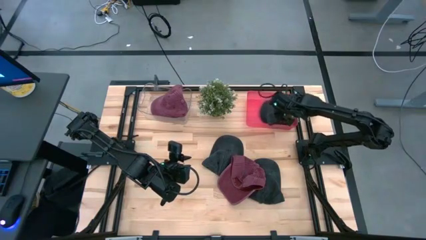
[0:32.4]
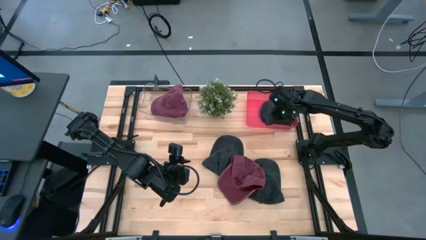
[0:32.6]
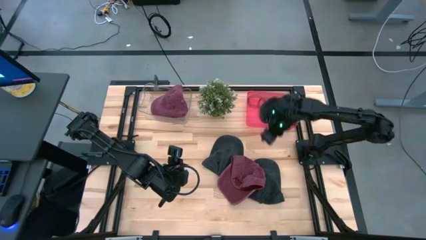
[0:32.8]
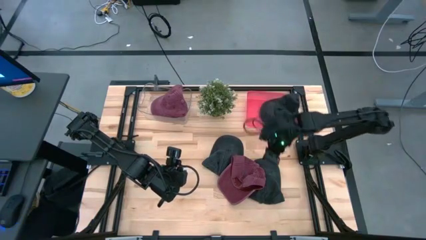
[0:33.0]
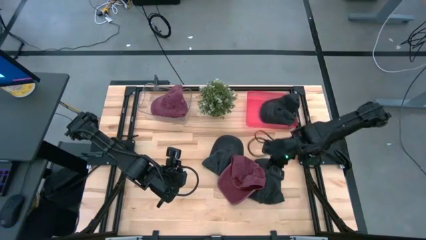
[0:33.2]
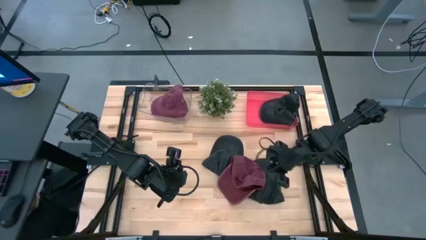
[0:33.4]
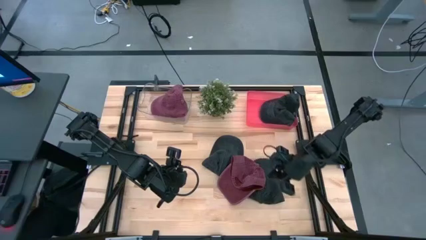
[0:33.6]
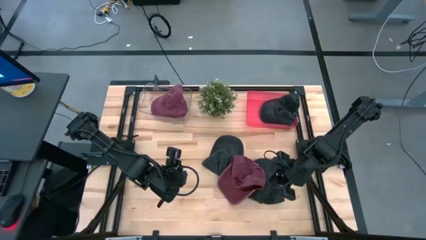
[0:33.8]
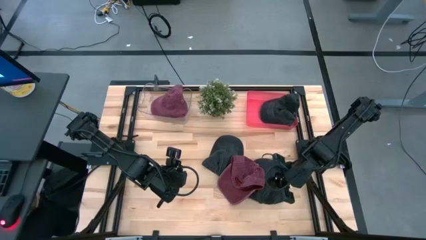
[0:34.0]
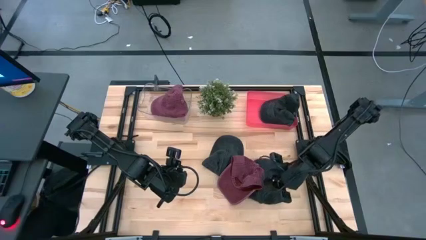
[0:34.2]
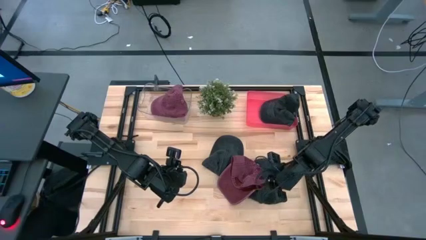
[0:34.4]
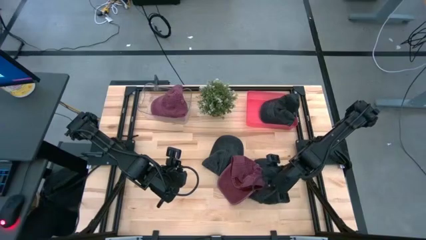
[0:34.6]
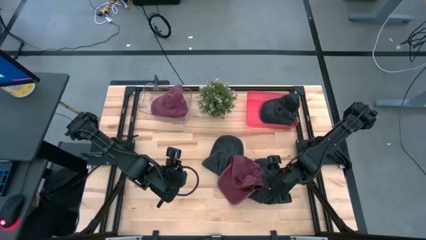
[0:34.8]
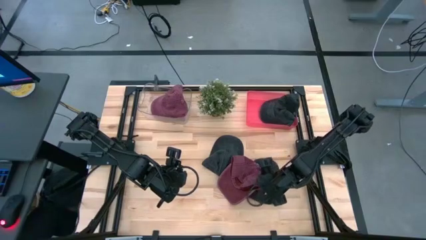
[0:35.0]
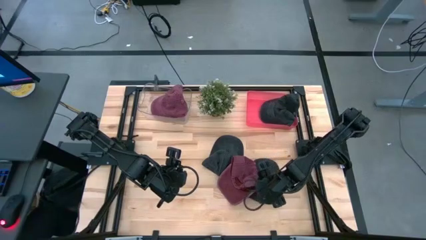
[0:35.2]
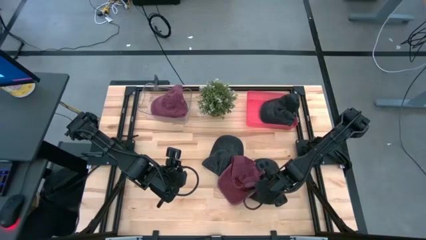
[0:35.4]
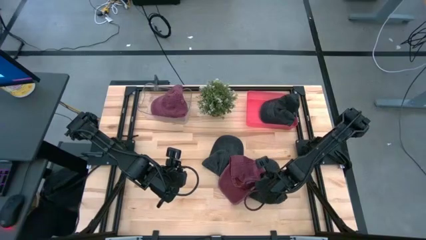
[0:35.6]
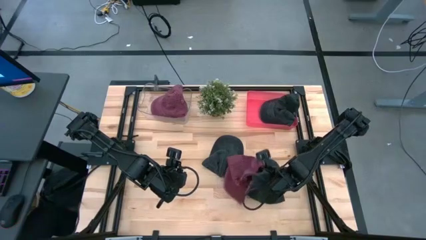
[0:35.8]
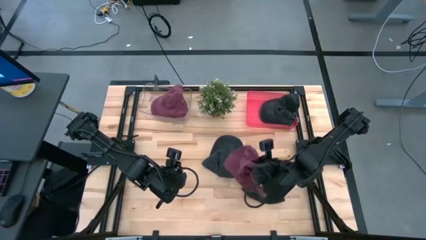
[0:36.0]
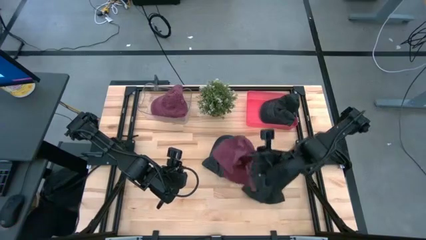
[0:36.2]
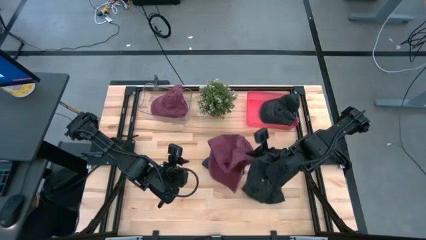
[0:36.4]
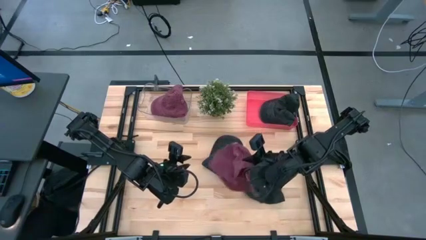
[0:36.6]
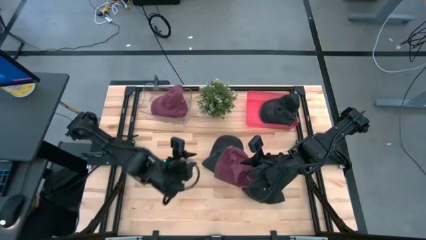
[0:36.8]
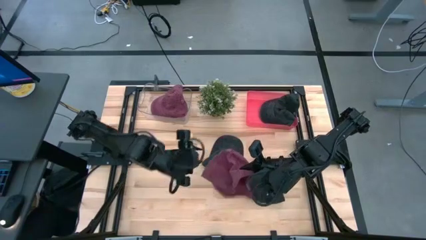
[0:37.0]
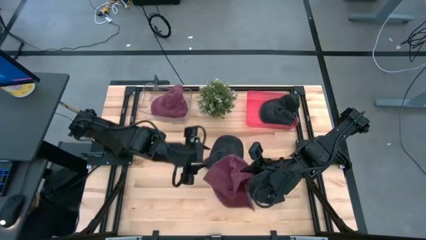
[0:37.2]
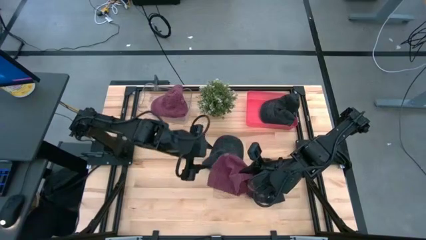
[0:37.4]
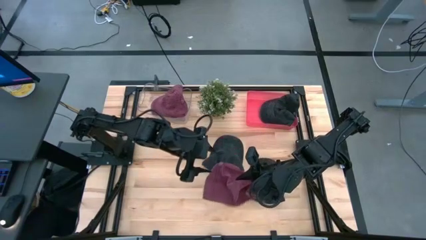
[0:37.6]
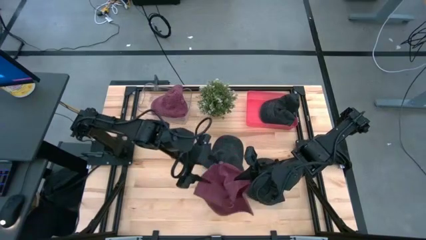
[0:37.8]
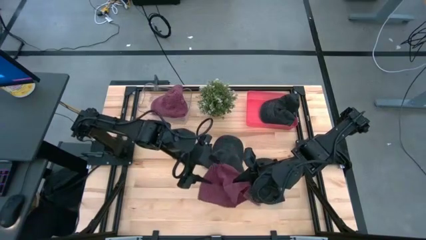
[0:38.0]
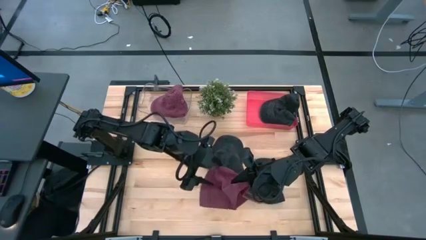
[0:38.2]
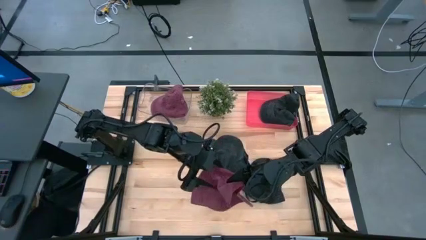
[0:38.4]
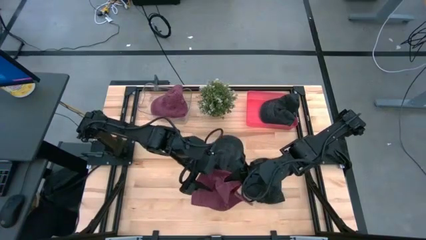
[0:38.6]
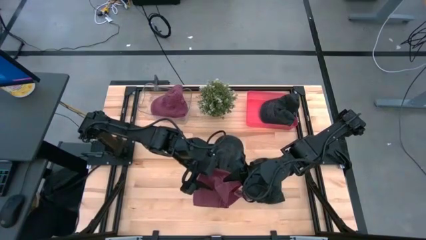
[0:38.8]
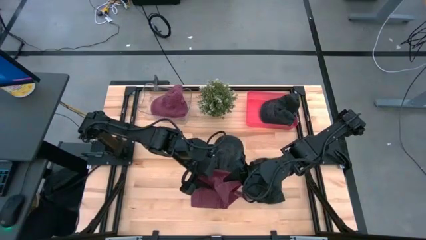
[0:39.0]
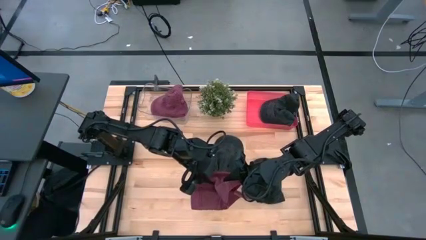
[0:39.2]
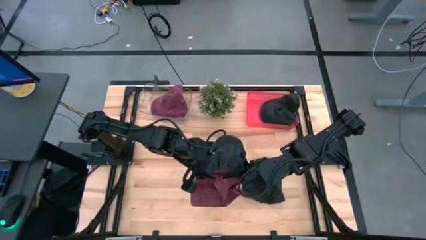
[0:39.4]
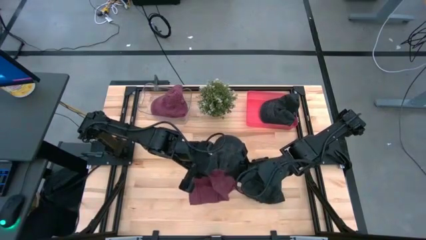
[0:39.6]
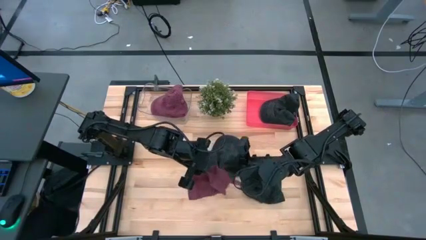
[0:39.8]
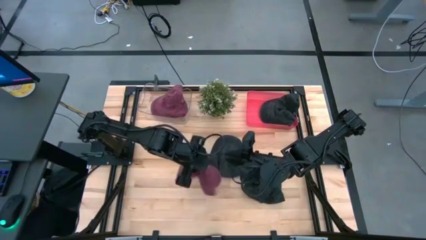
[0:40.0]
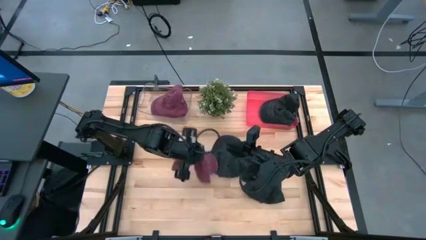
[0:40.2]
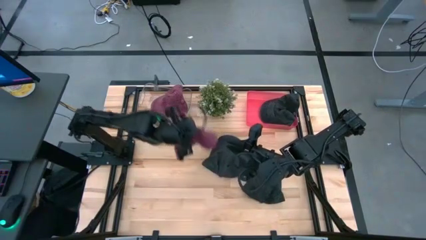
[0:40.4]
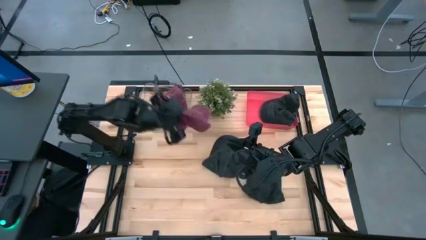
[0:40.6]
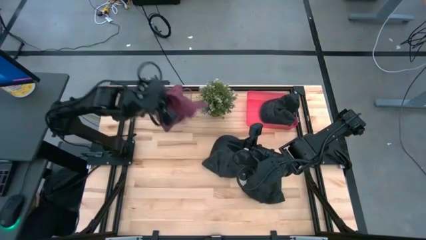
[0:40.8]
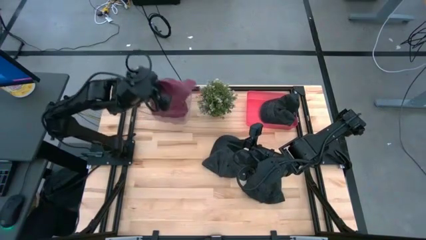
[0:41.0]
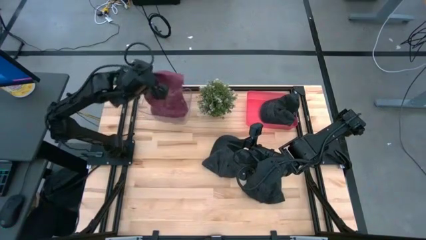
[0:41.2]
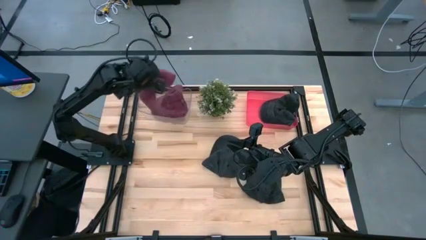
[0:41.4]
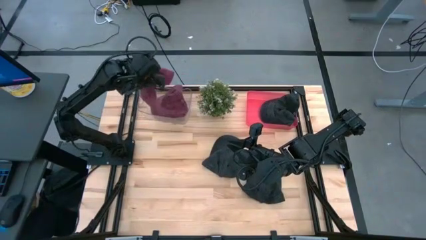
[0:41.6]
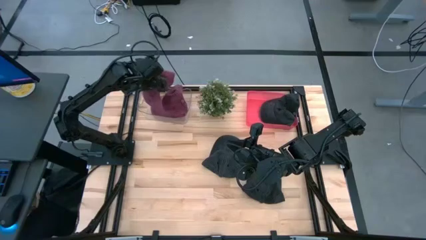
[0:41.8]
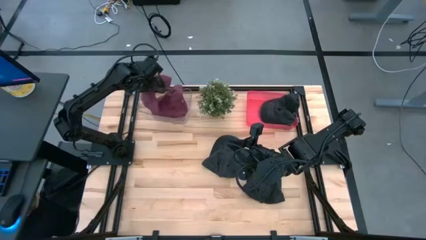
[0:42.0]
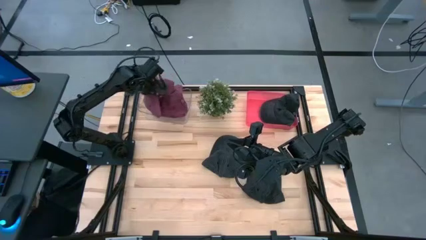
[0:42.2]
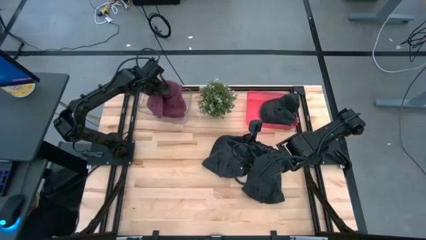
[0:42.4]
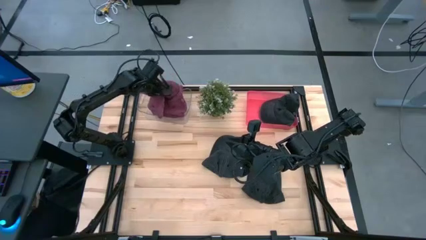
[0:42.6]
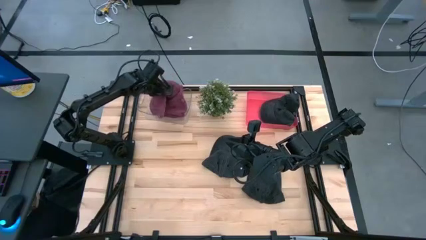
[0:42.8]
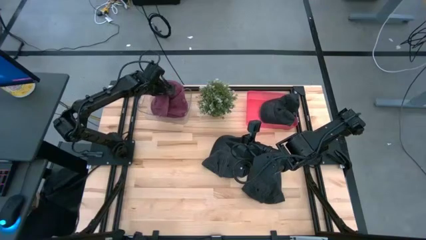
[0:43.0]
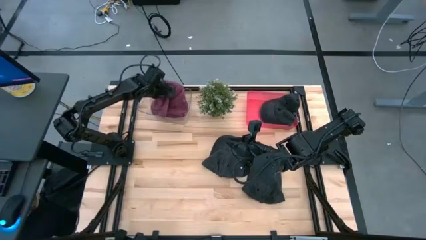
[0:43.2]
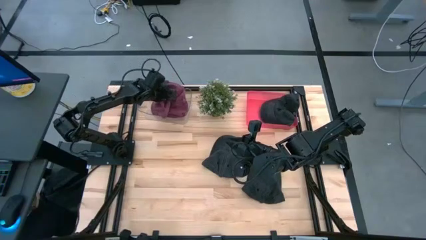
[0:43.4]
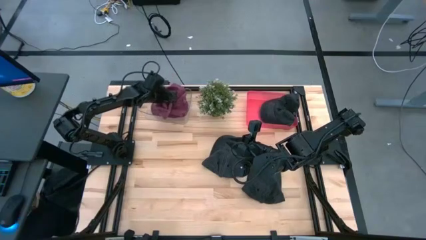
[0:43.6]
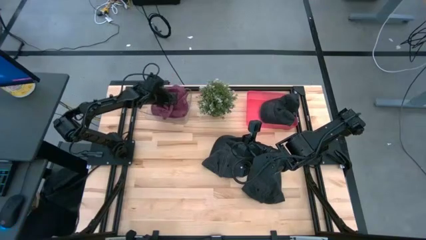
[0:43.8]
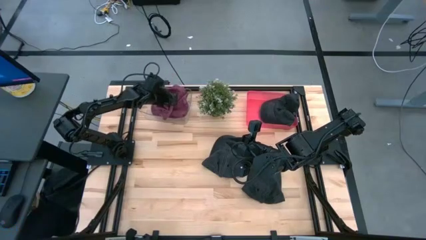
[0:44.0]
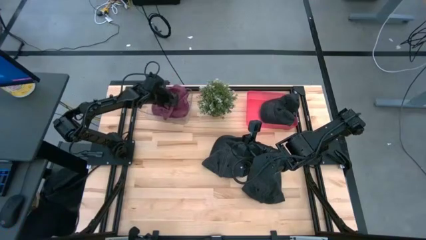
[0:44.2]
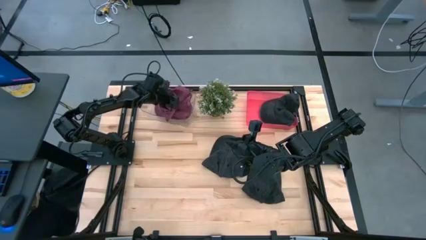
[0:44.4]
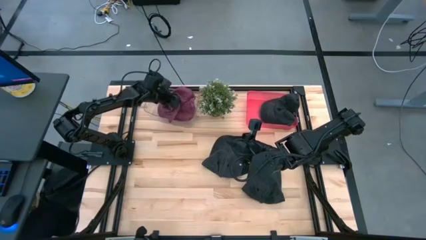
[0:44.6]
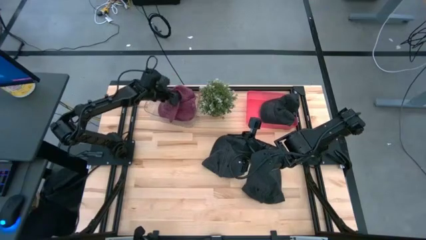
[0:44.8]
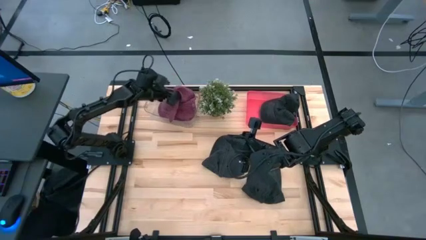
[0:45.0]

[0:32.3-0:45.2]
Task: Pick & Place hat
Put the red cap into the transparent bin

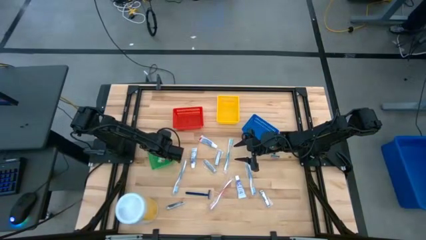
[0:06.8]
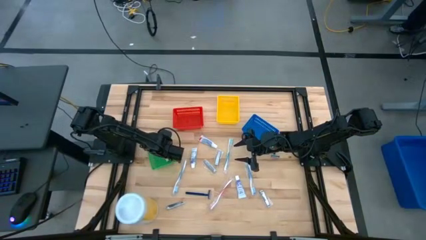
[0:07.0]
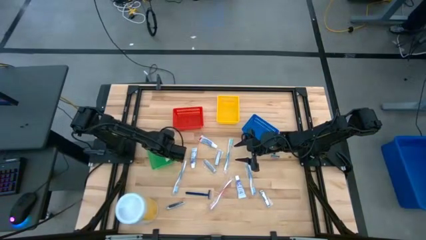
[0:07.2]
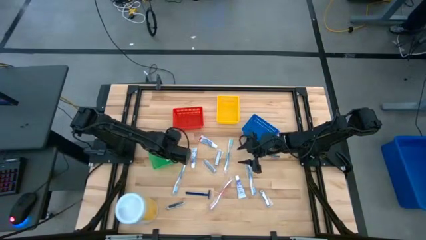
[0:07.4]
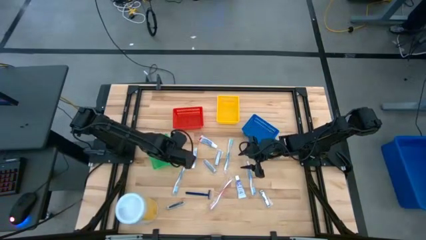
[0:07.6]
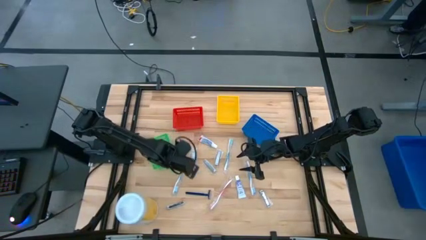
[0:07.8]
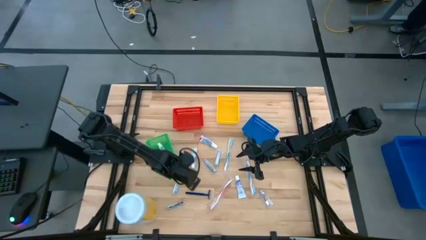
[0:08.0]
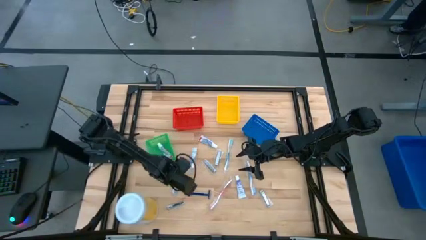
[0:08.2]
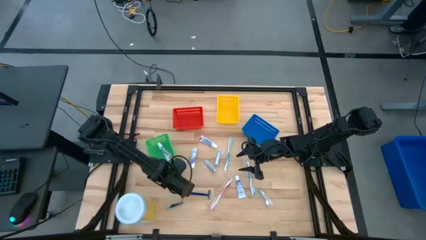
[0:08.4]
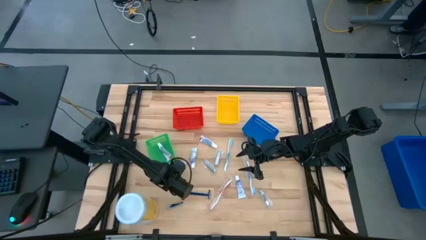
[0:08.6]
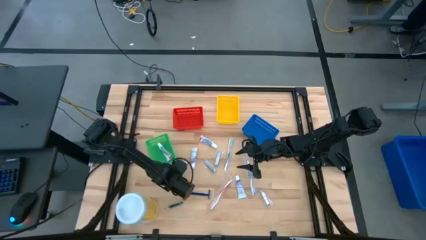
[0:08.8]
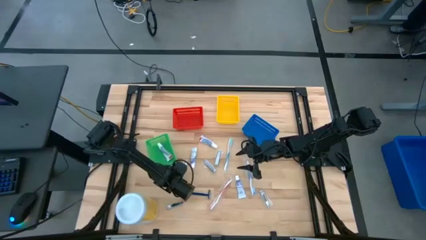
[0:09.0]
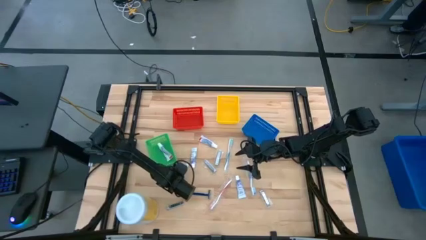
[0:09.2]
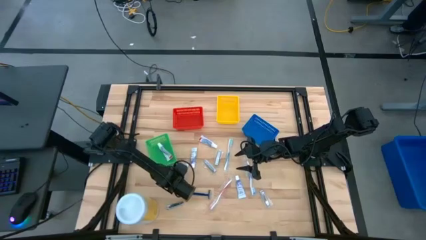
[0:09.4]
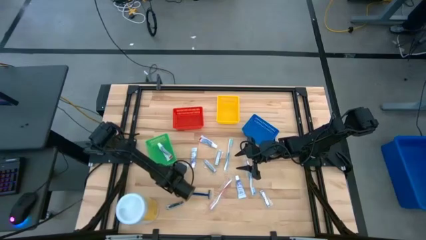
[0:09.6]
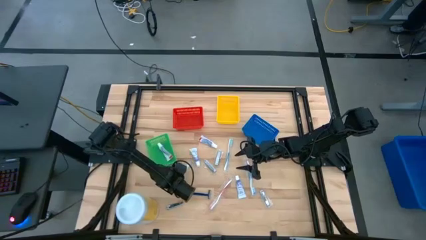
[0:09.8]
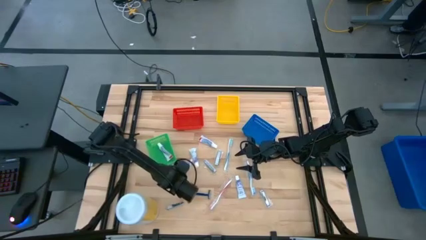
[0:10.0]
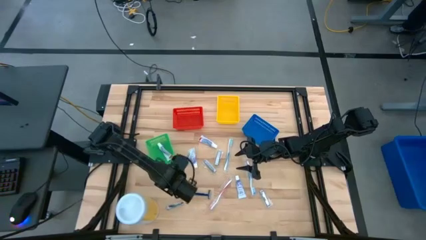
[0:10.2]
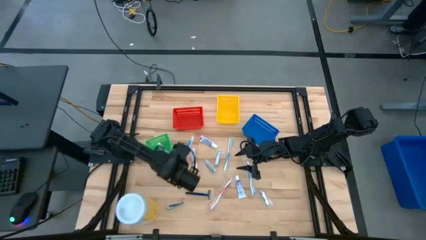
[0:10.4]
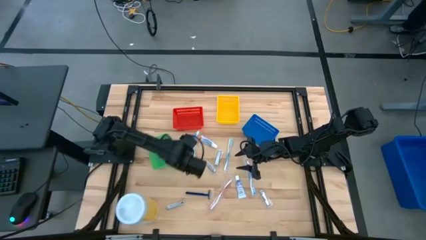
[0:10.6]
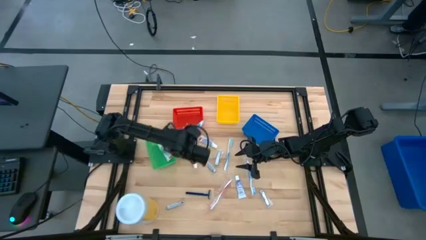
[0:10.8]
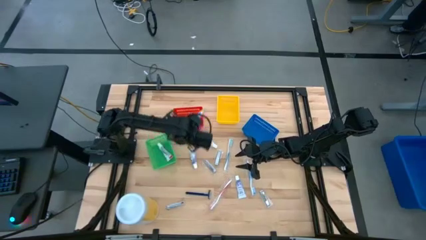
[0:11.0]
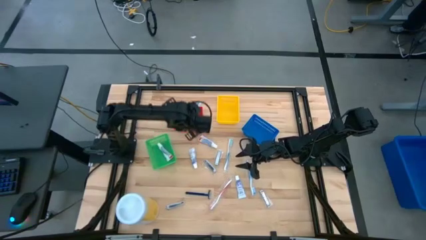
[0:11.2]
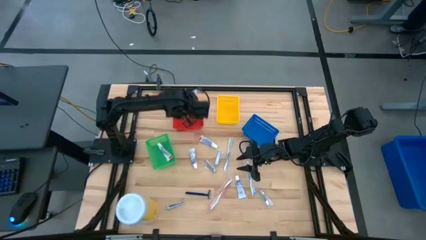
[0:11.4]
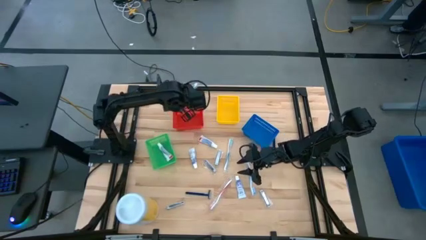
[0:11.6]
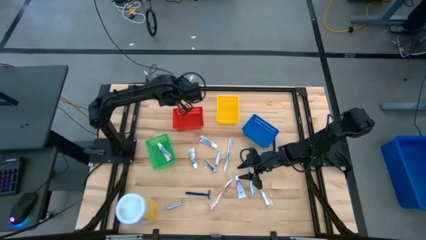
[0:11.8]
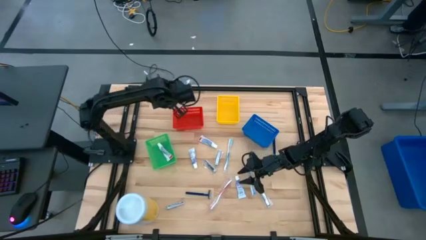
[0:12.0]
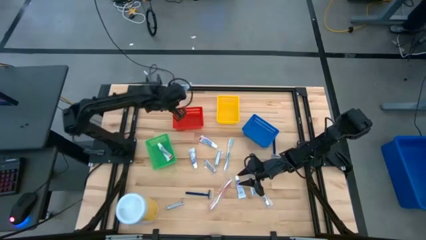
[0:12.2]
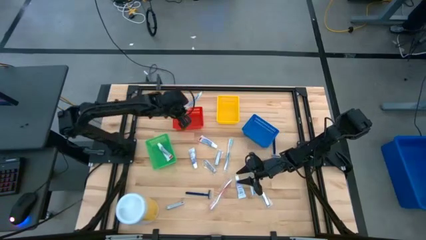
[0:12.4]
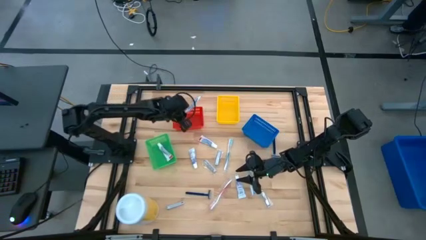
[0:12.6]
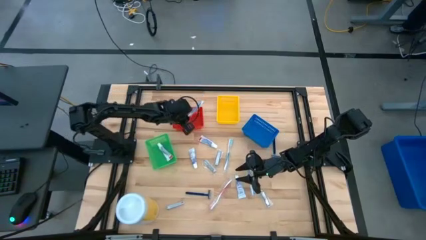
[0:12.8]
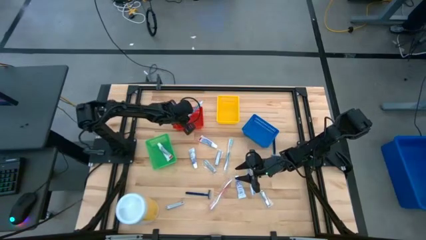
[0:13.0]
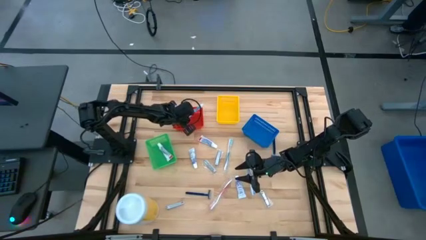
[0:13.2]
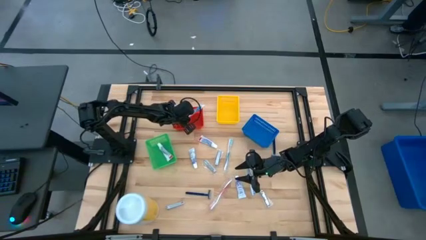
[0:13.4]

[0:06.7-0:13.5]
Task: Pick & Place Travel size toiletries
Put the blue toothbrush into the red bin
